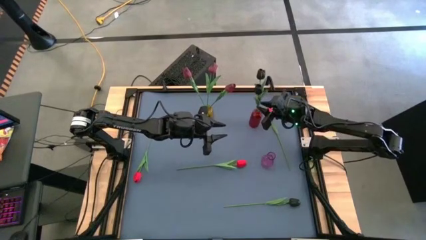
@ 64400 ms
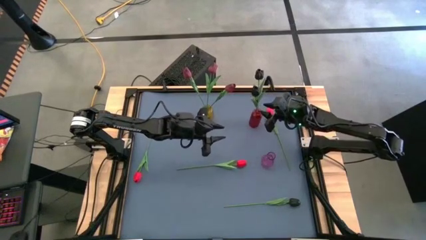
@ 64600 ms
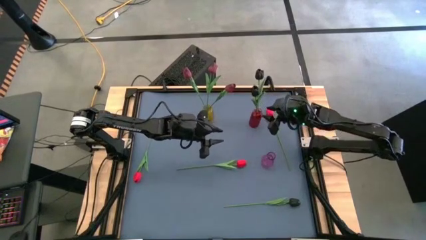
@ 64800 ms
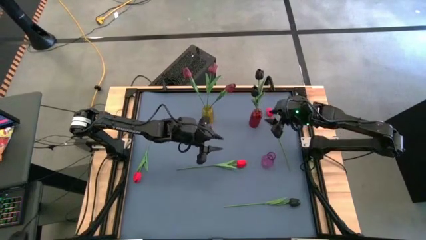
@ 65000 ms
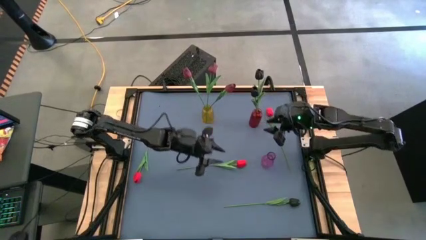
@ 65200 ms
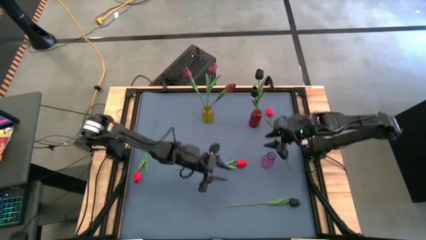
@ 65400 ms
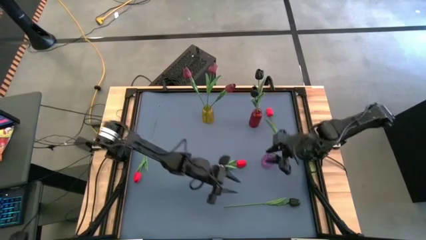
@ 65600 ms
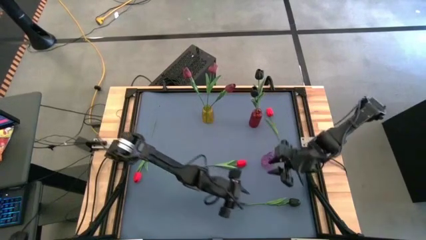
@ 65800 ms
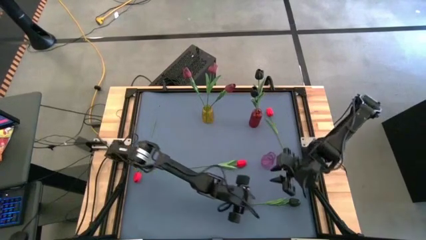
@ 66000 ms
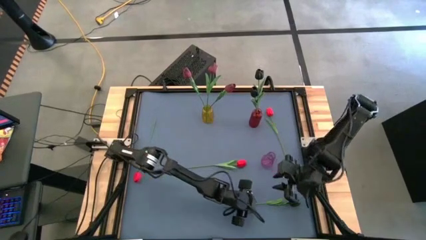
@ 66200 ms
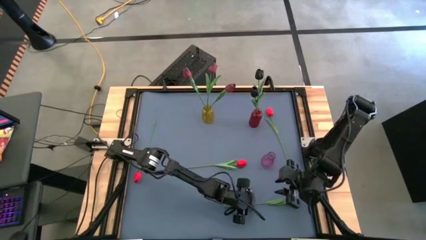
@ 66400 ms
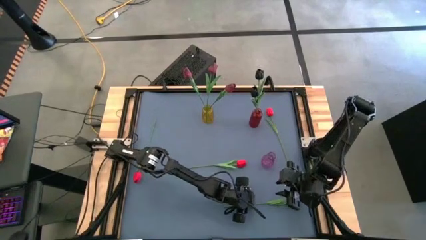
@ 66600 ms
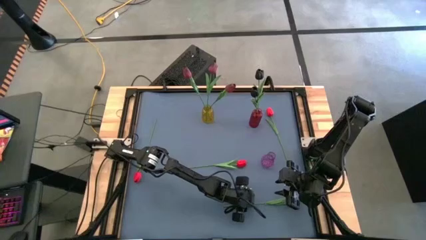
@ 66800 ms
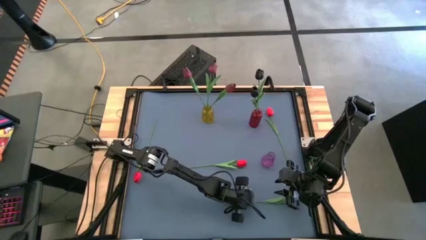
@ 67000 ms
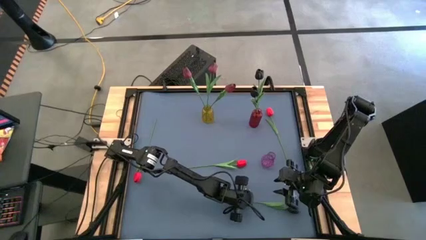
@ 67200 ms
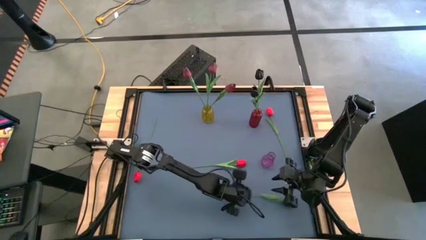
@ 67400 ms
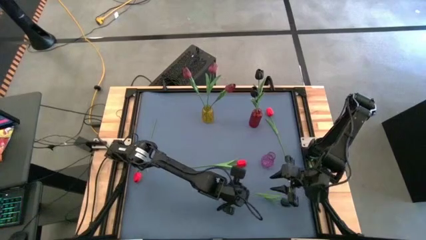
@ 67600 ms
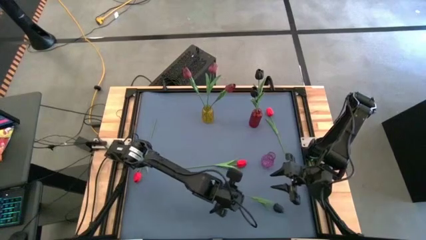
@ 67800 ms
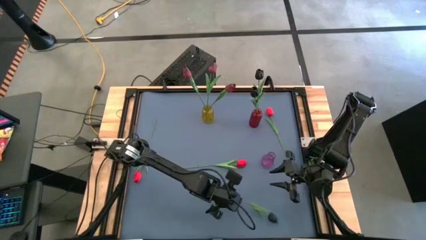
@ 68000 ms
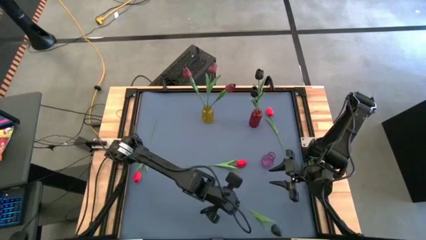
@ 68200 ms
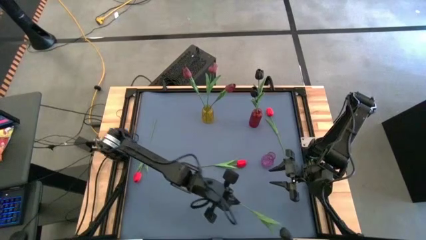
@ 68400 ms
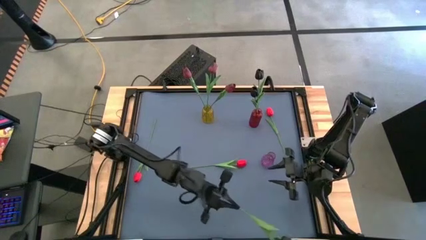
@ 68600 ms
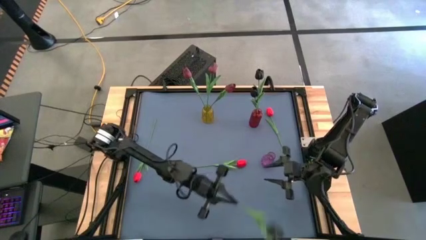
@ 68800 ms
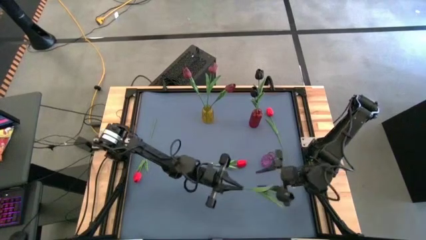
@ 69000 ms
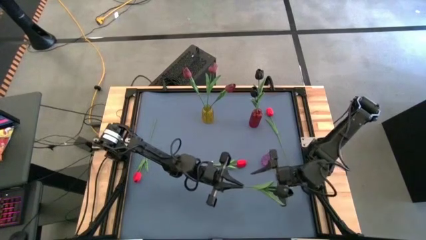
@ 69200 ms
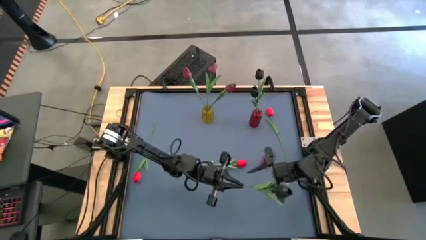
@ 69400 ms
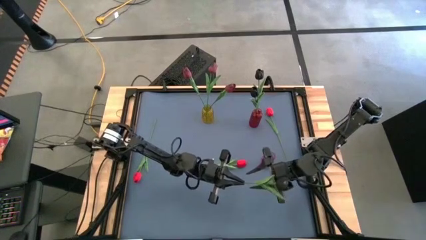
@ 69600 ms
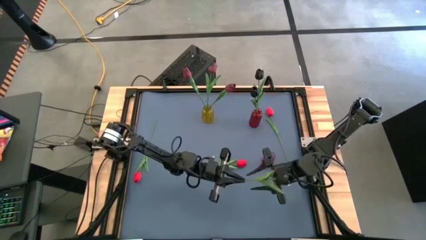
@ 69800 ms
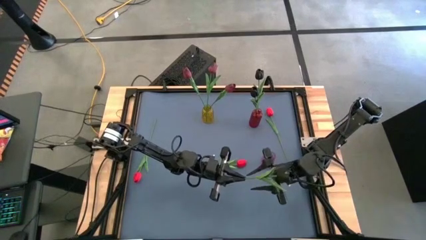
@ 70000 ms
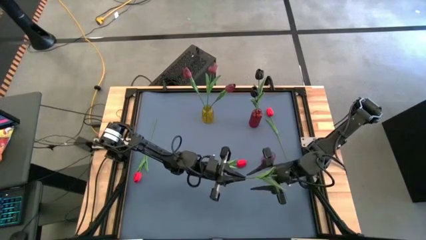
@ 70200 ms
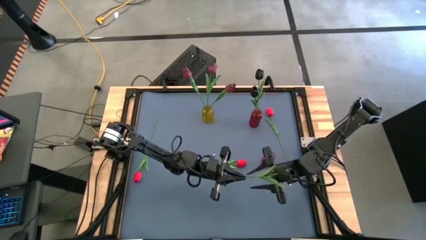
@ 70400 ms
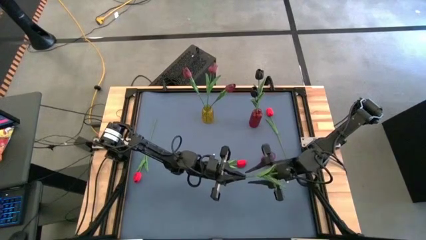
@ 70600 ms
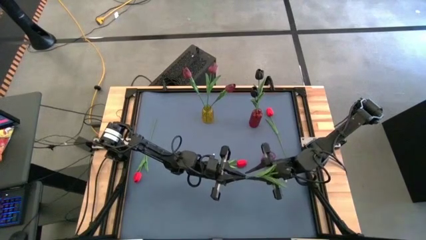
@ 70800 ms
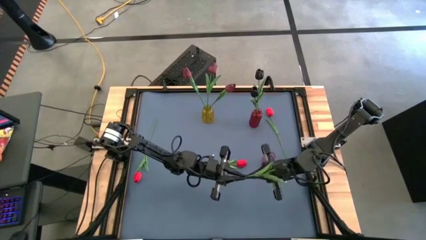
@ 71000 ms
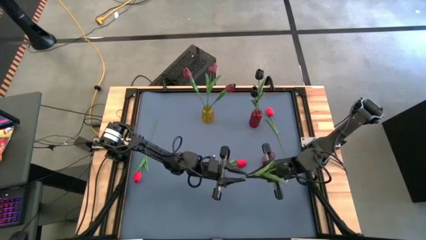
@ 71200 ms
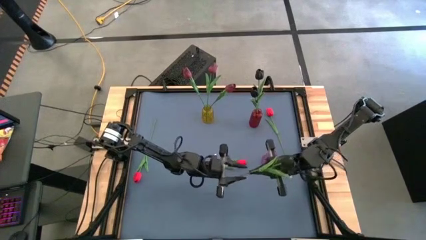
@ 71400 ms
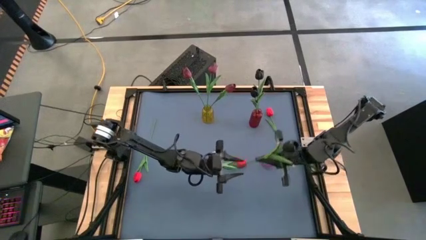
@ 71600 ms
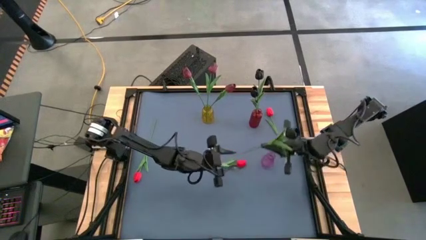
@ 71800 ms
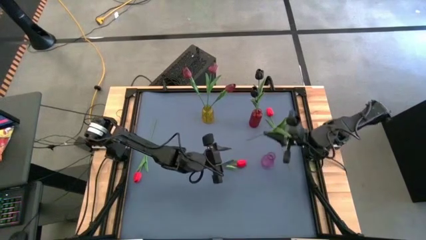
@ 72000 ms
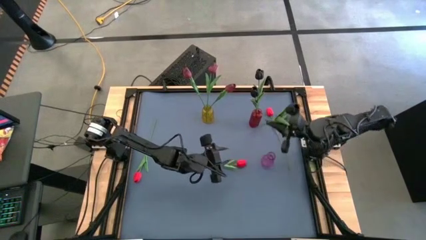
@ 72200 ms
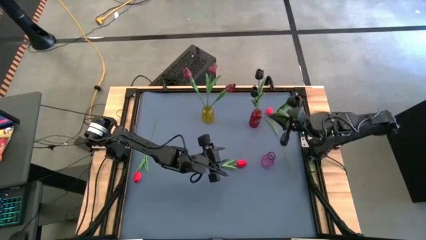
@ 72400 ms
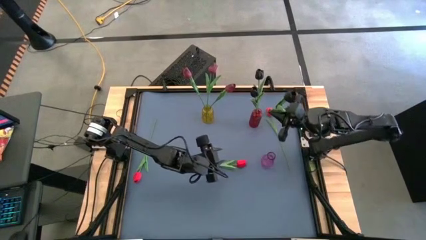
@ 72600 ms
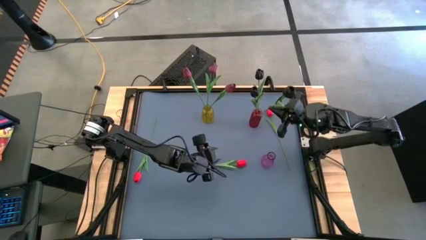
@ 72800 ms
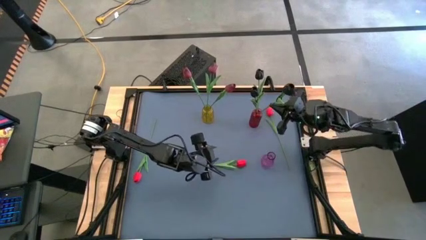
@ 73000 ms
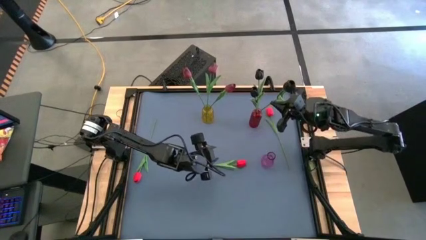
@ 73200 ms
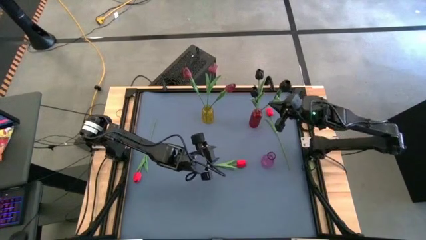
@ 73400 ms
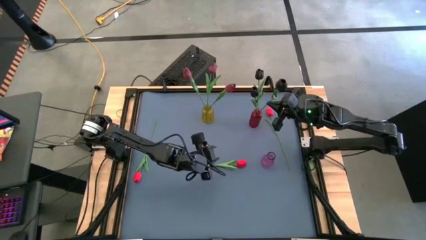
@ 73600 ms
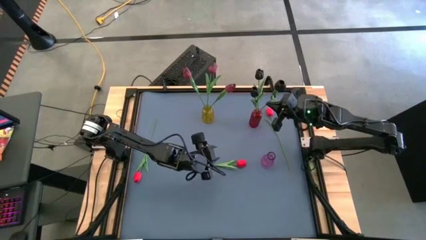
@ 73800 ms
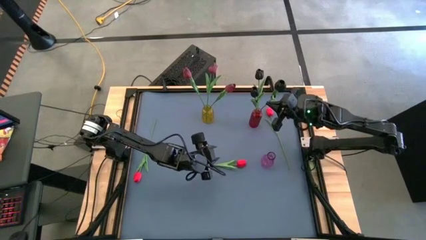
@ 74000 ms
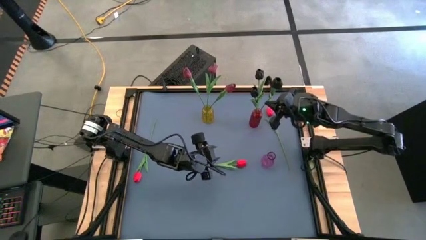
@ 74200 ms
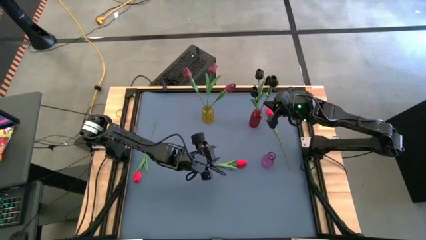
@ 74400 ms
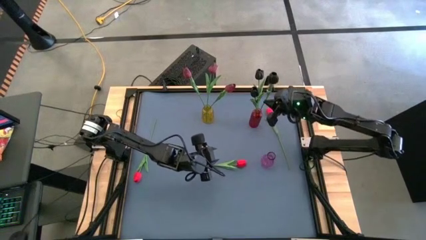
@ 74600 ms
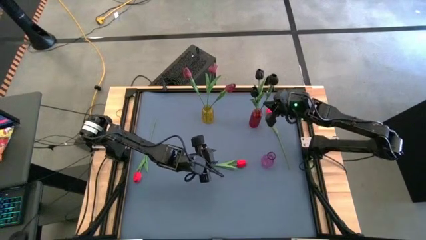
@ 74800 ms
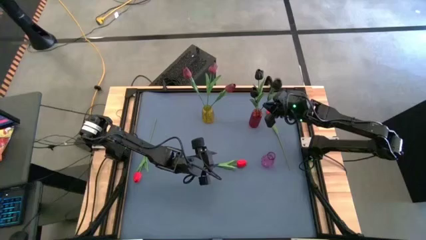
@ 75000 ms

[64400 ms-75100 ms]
Task: Sort flowers into vase by color
Put the black flower into the red vase

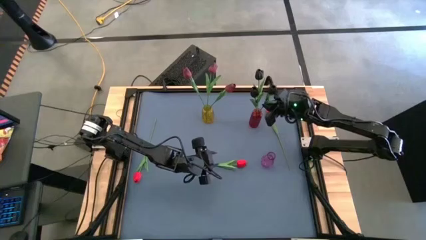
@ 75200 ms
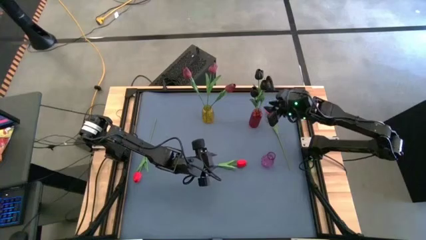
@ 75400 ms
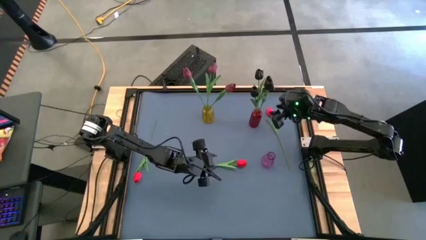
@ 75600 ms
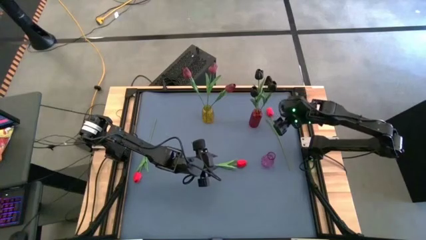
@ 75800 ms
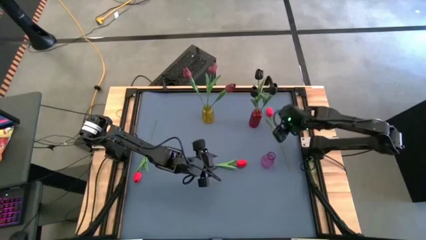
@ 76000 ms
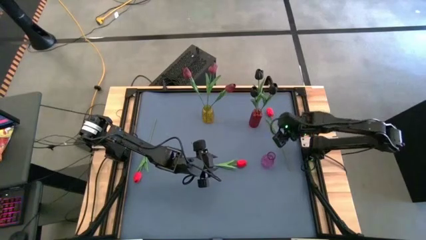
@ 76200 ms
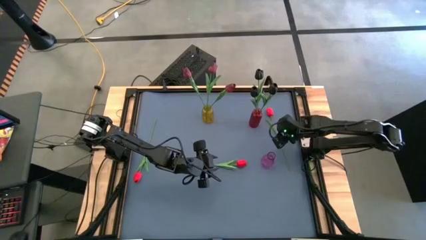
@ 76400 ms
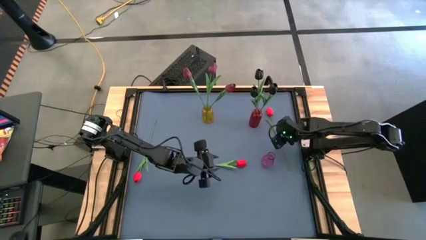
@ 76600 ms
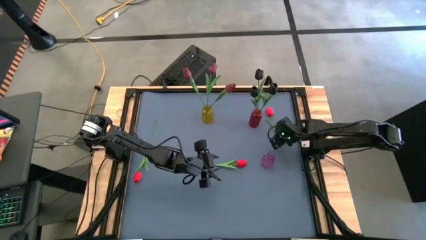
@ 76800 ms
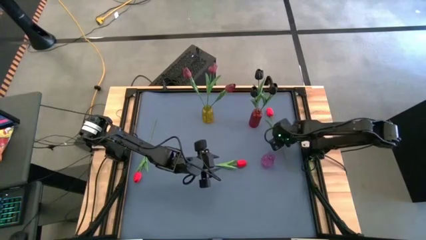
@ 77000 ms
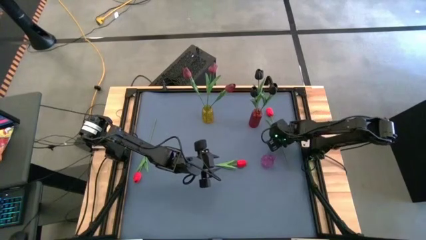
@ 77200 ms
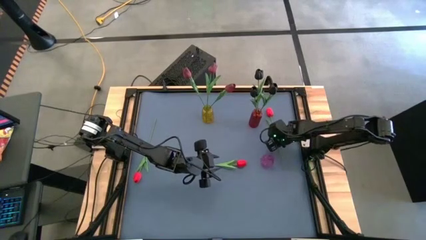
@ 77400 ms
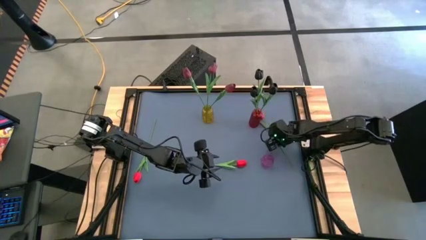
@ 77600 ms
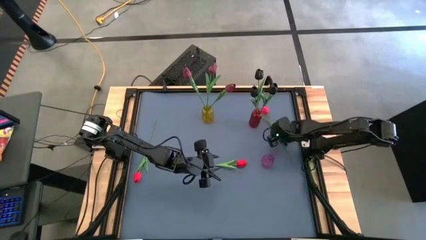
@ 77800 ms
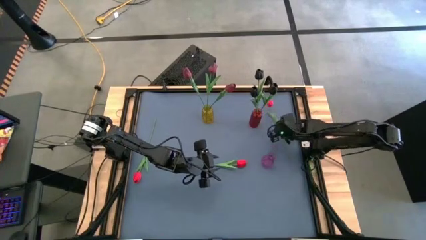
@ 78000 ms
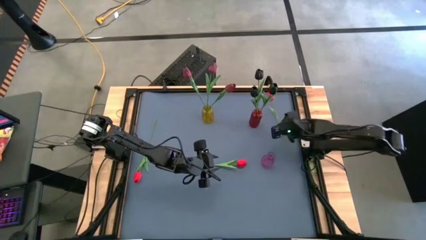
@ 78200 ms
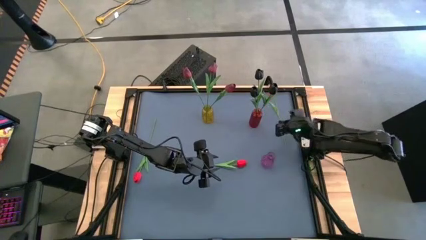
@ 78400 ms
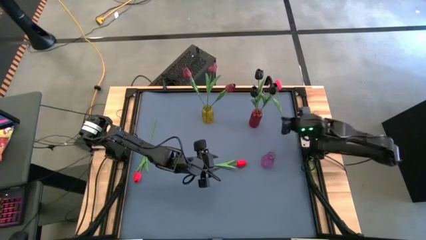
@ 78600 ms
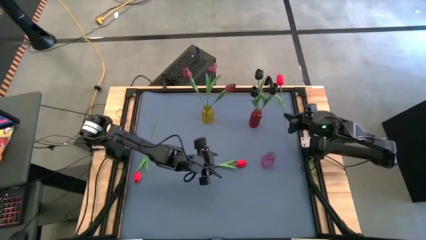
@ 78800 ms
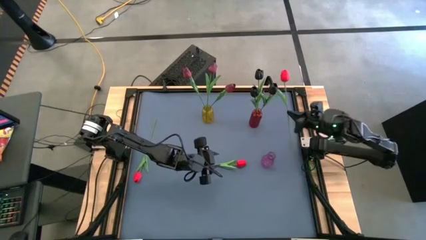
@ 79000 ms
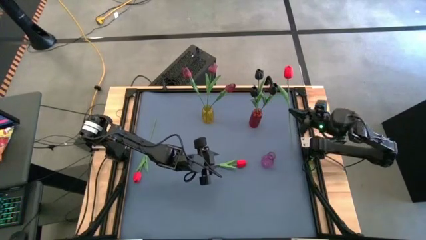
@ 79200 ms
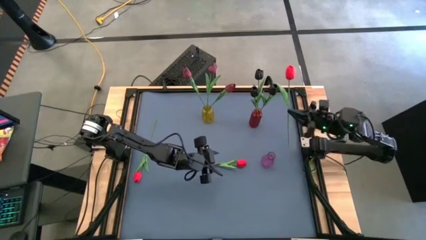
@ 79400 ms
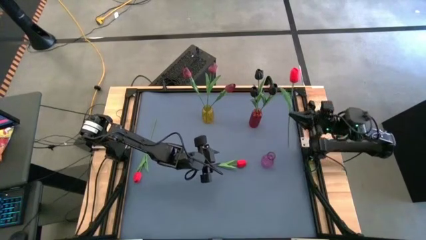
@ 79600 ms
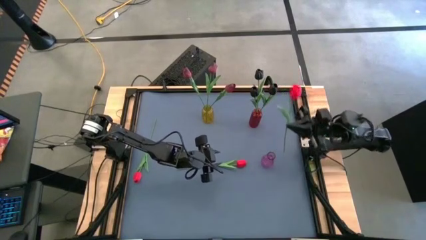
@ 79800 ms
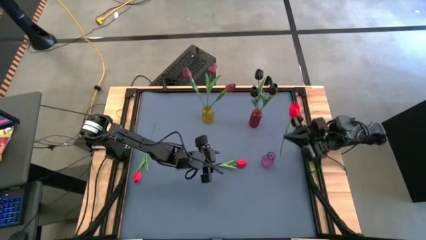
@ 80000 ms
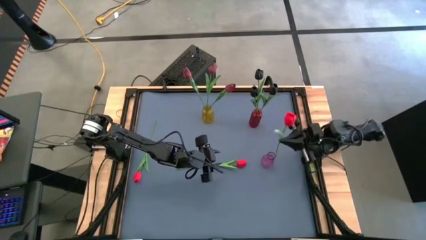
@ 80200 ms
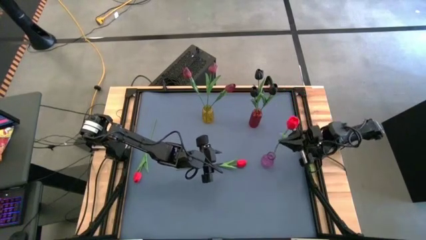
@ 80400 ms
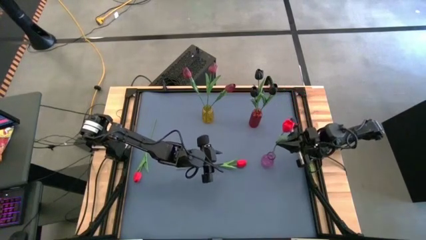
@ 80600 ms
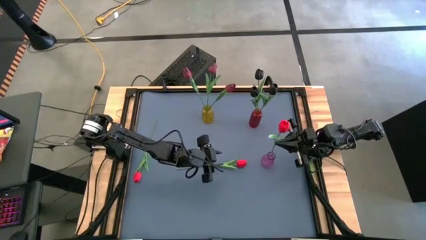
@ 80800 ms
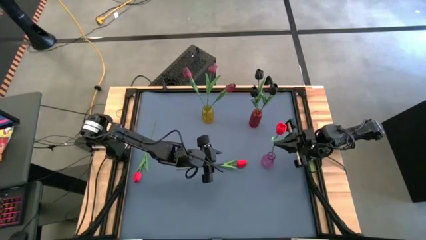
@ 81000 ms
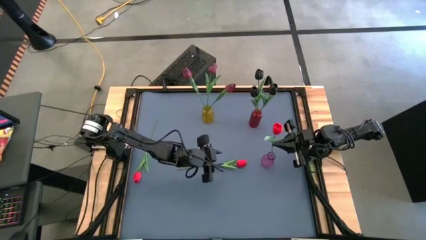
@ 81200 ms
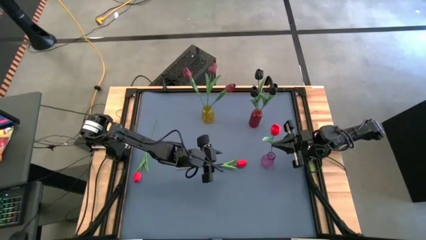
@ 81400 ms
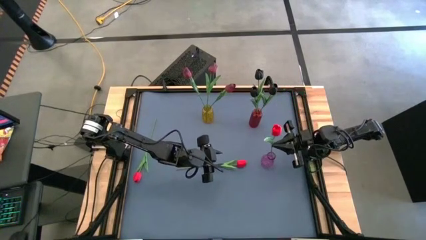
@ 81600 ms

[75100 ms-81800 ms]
Put the right red flower into the purple vase
